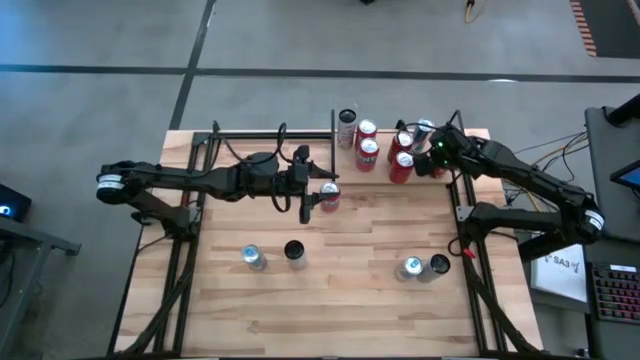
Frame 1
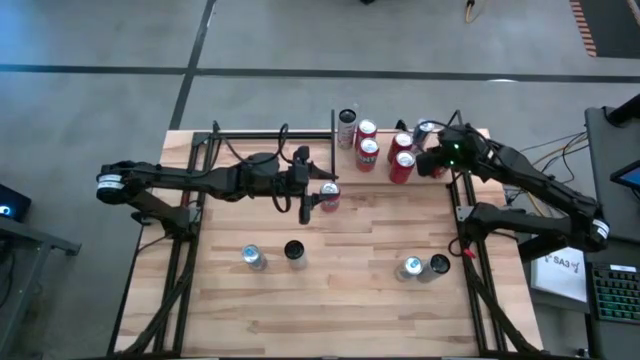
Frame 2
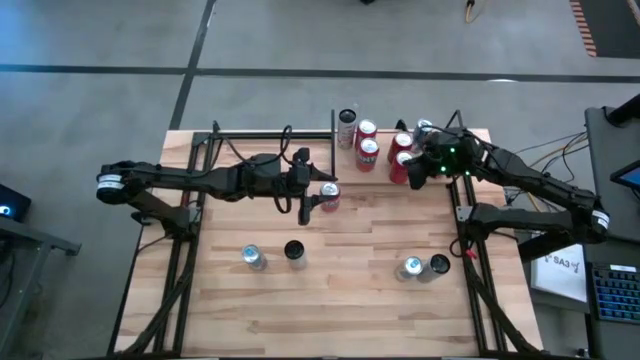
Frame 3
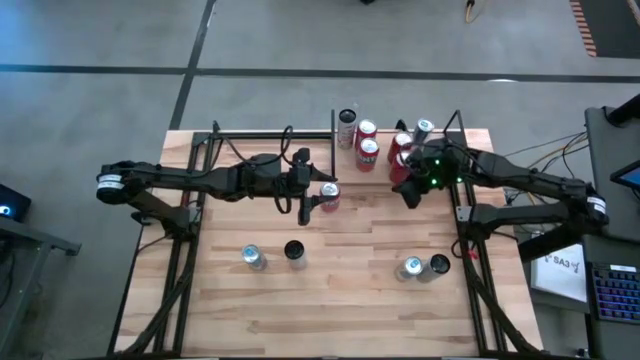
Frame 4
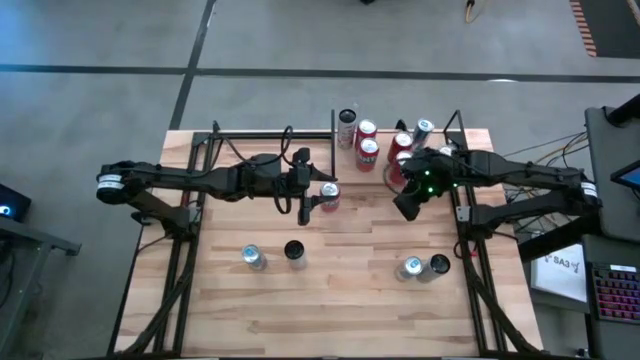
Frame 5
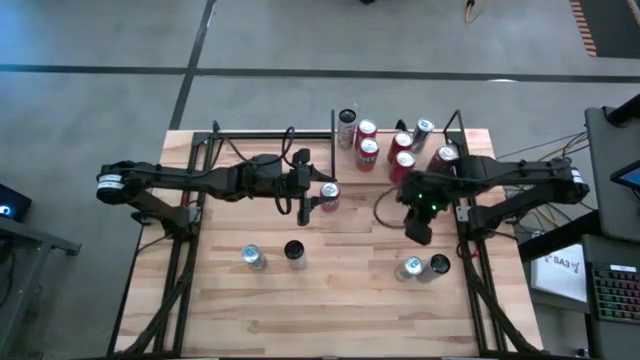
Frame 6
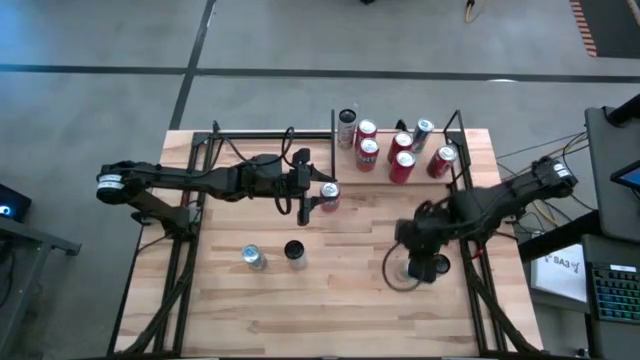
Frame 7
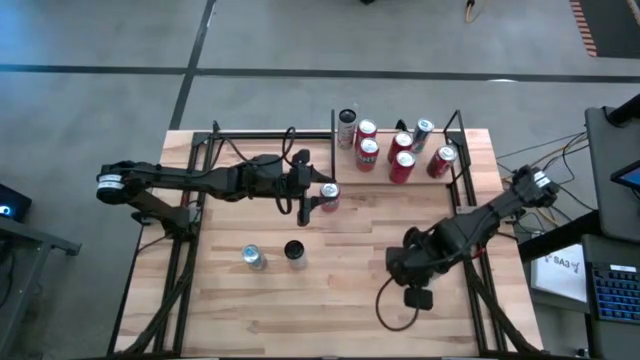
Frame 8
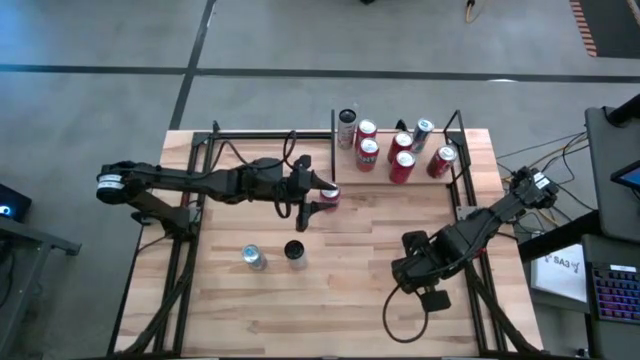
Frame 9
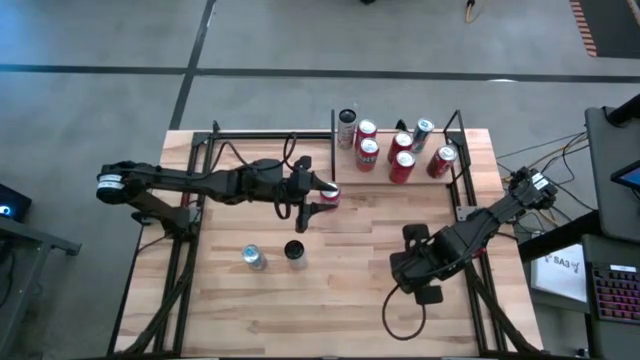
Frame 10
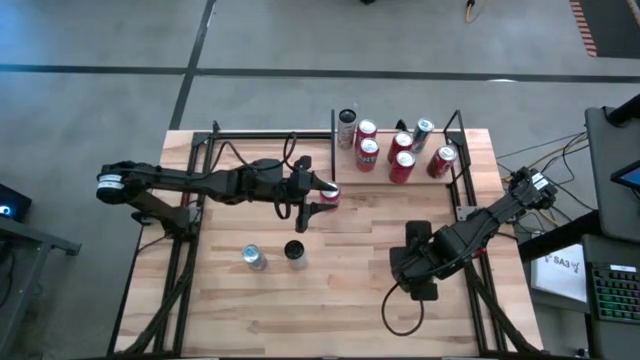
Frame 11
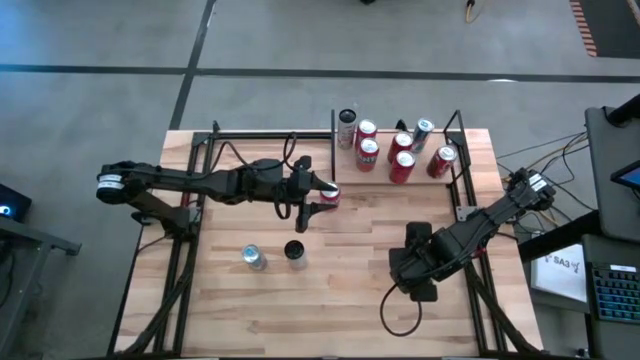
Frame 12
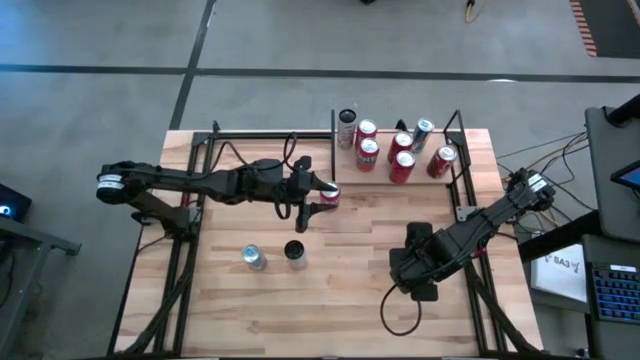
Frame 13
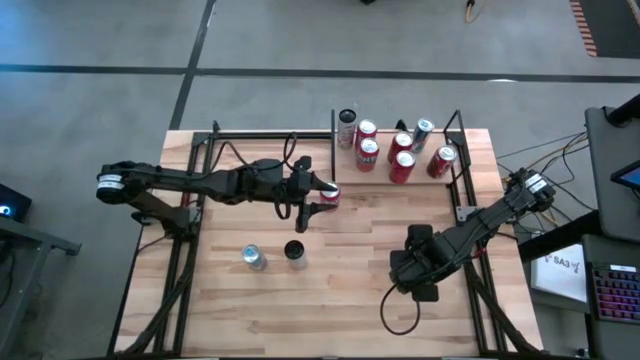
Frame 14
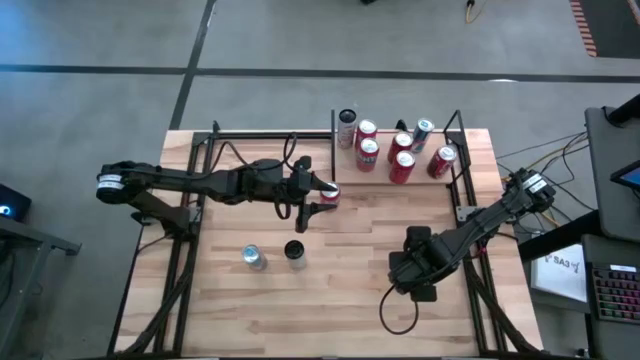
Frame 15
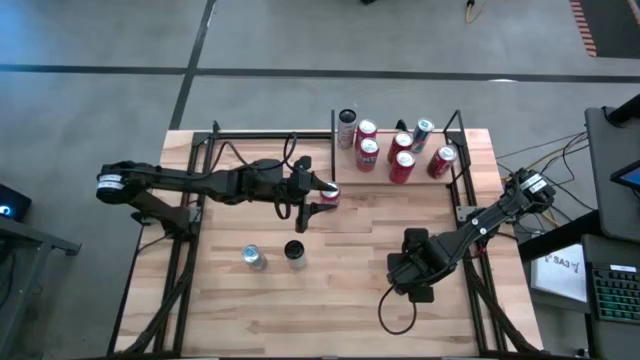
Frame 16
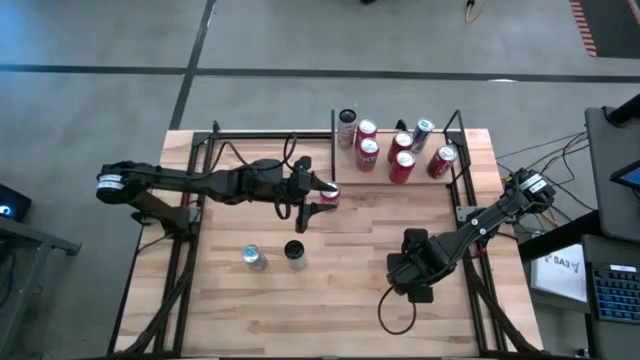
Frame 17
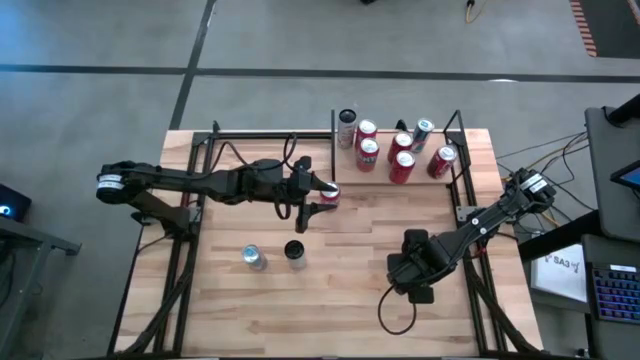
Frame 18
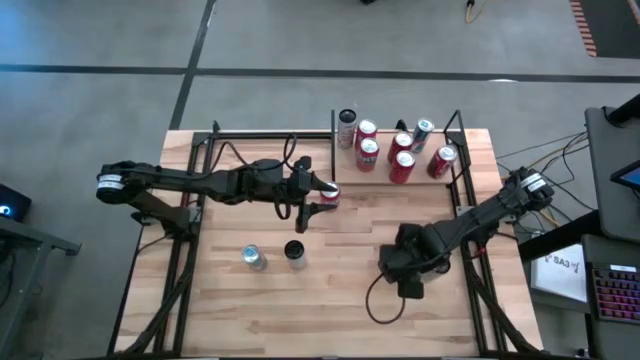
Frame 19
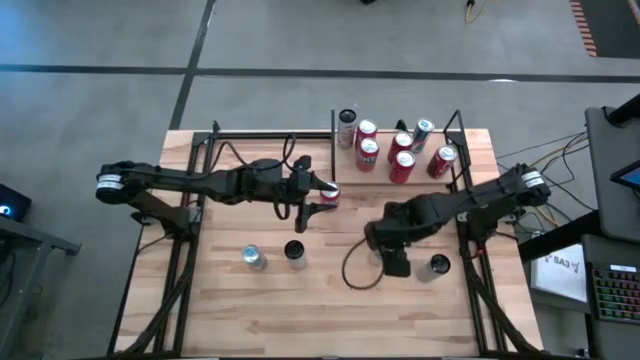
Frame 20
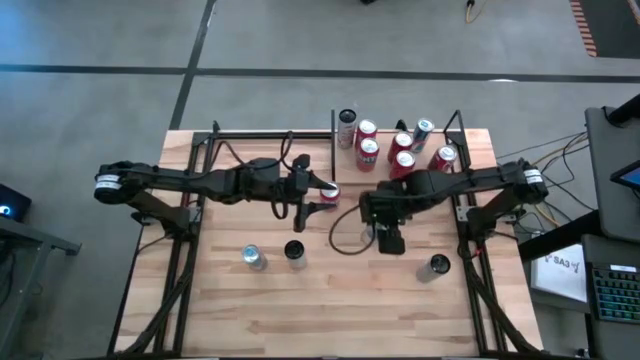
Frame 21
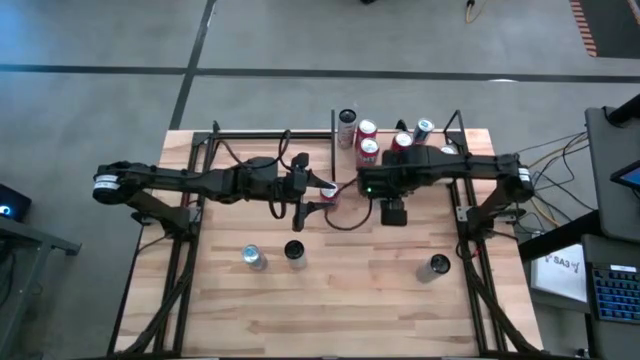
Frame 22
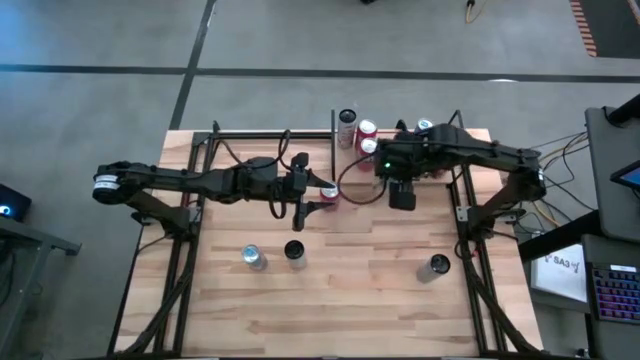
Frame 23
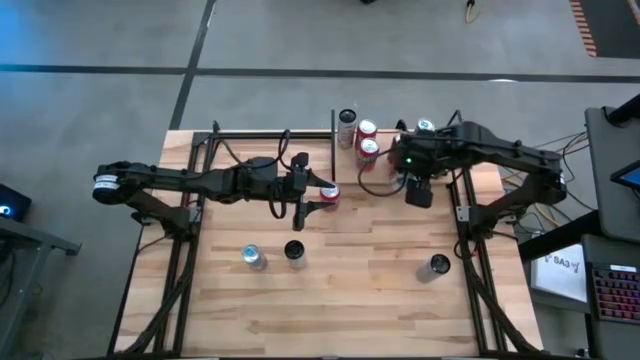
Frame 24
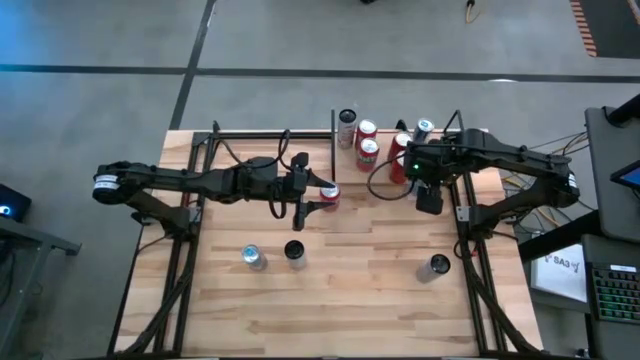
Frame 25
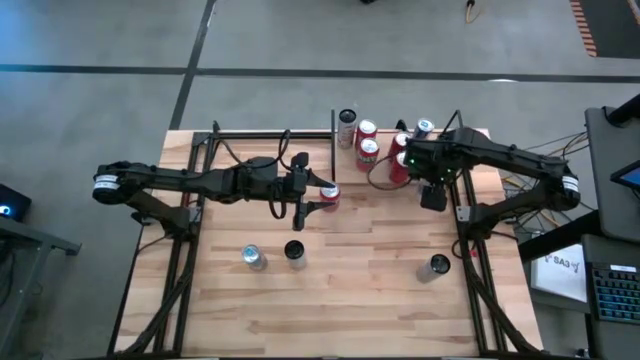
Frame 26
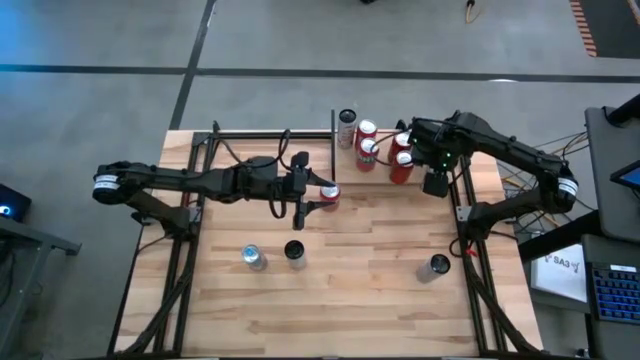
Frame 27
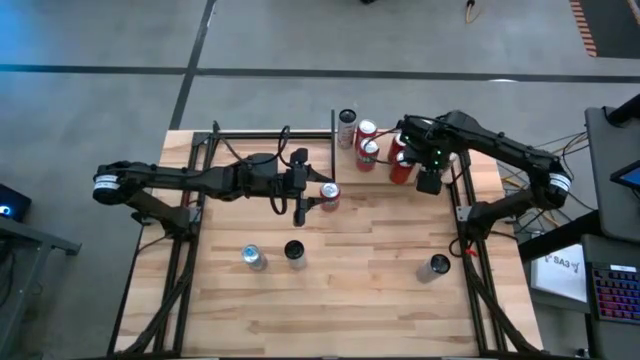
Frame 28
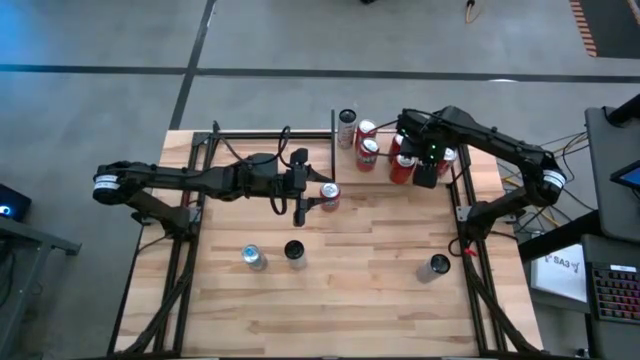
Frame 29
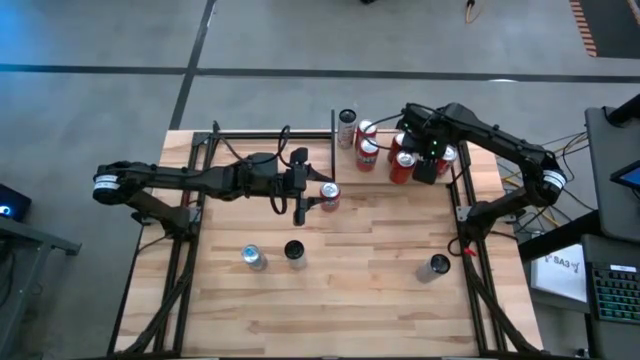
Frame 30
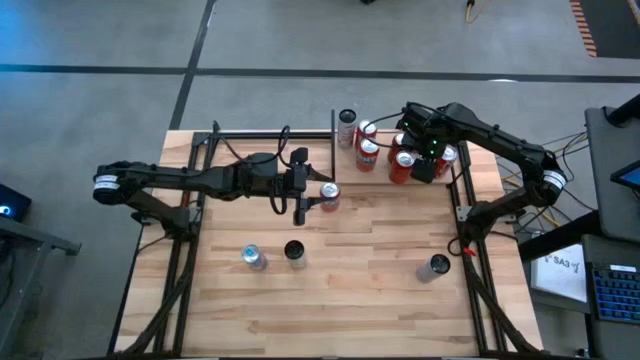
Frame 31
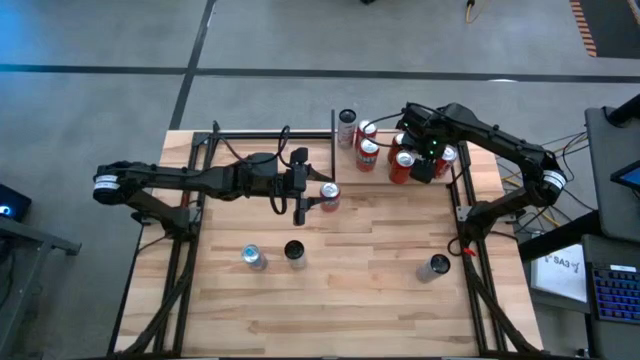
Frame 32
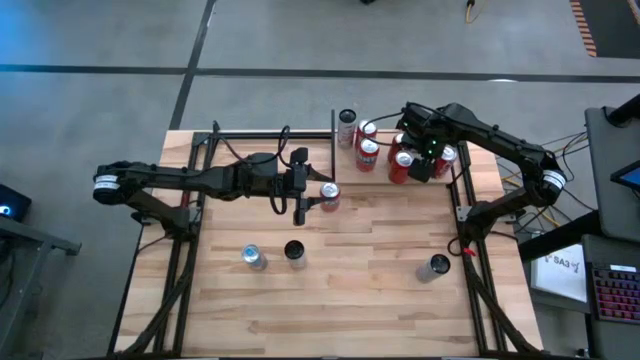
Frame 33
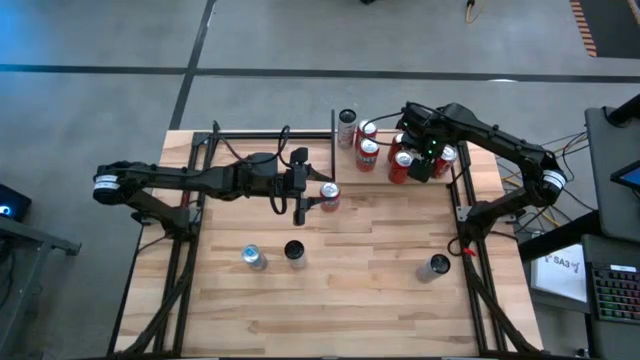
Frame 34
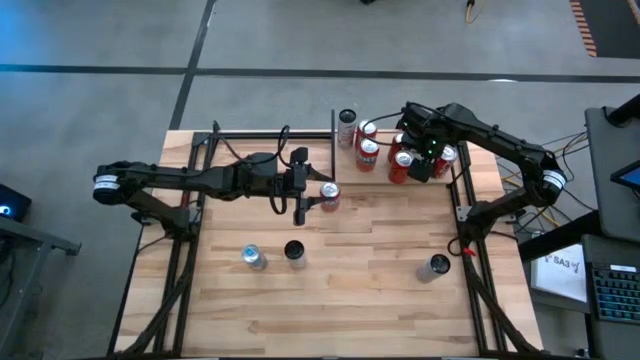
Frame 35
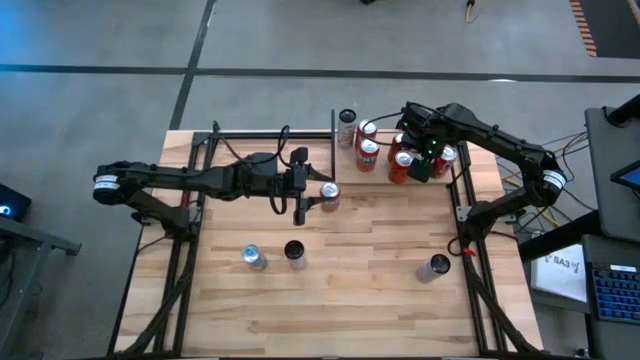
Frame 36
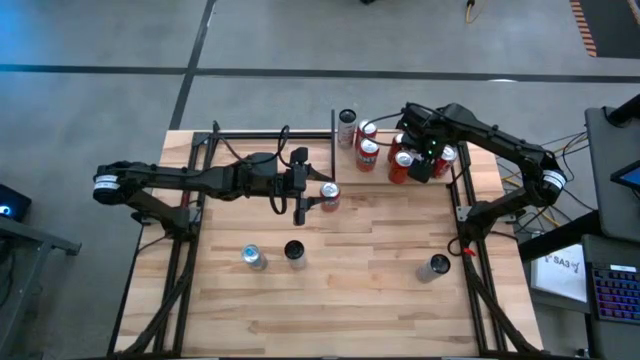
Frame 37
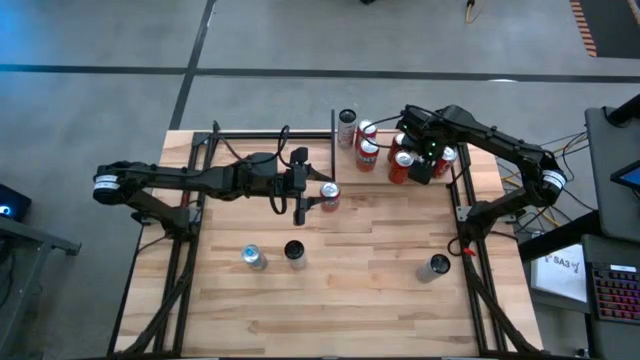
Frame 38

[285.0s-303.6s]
Task: Place canned beverage on shelf
Put the right blue soda can on the shelf aligned with the other blue soda can

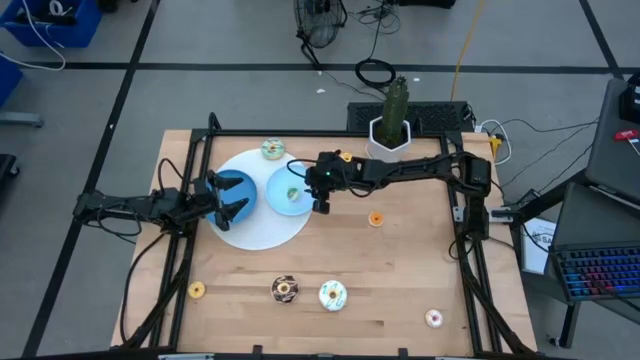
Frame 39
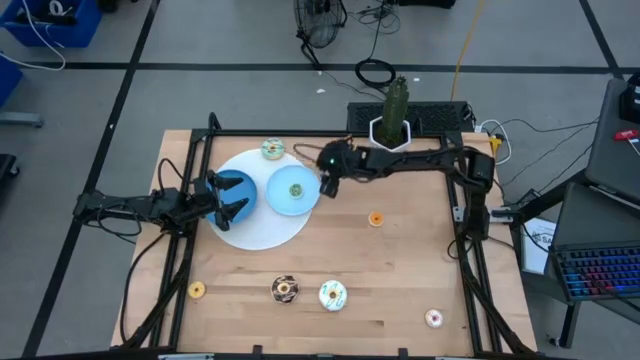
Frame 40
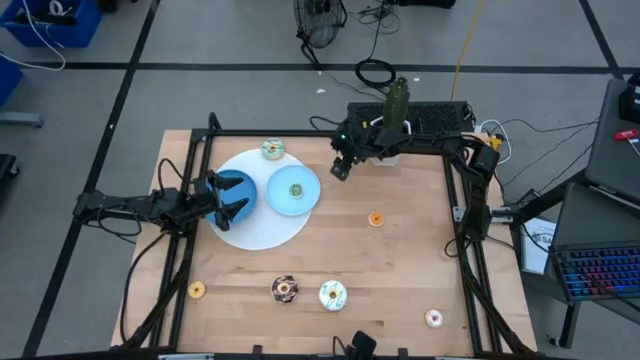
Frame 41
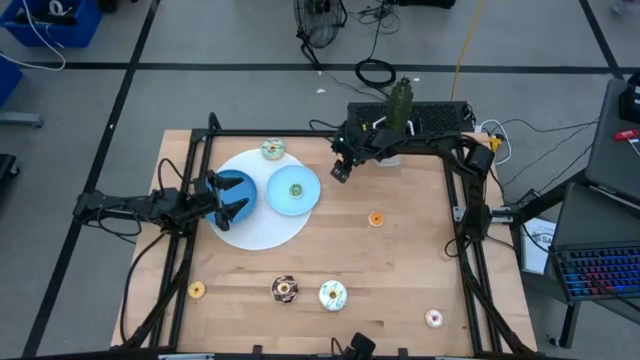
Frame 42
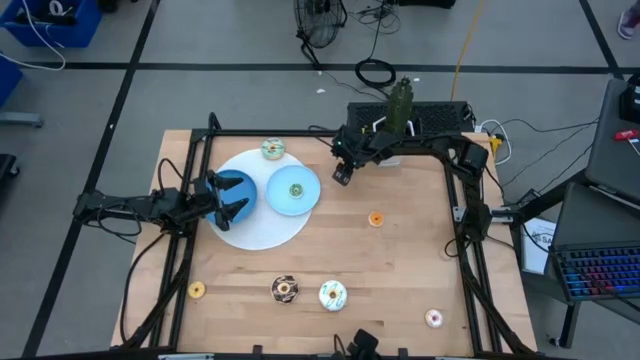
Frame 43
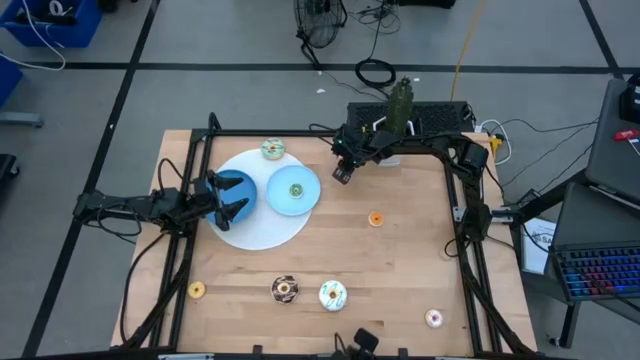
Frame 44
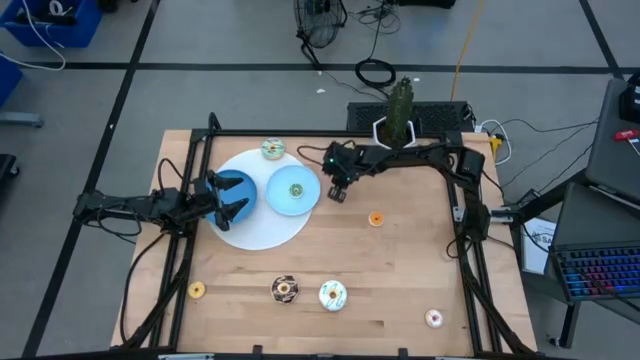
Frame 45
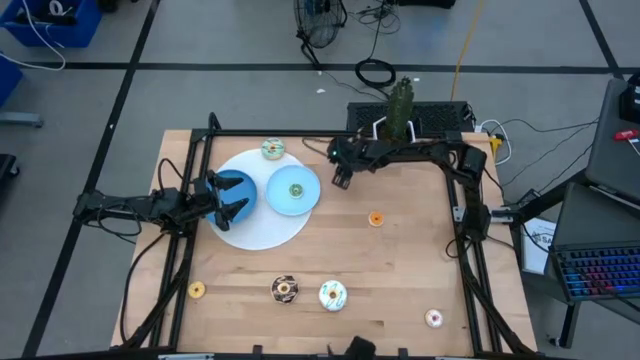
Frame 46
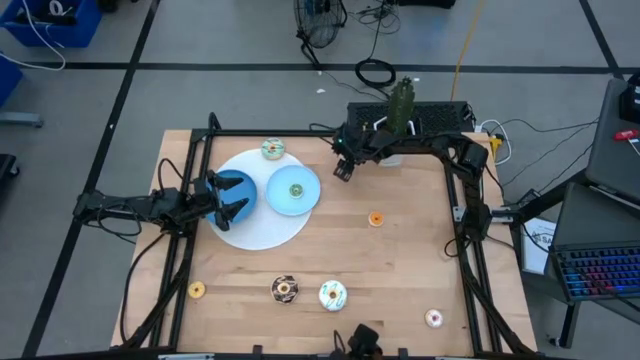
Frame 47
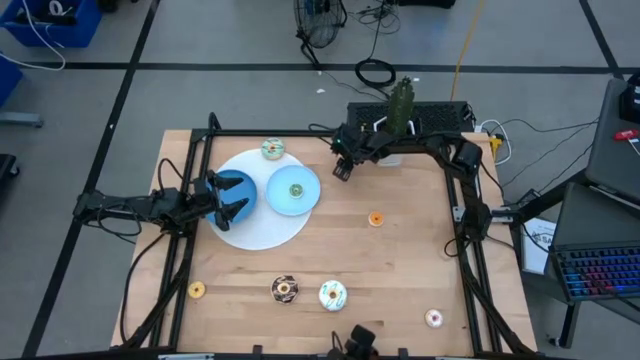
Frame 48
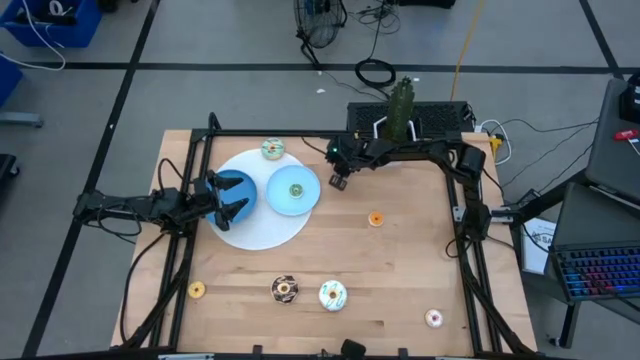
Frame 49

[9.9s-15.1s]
Task: Pick & Place donuts
Put the yellow donut on the blue plate
